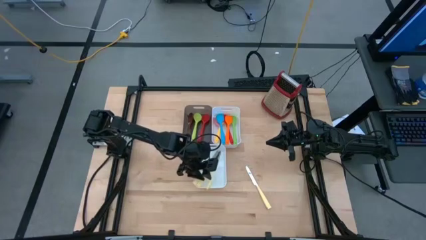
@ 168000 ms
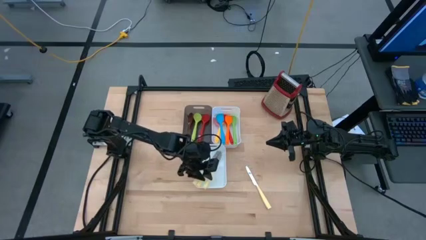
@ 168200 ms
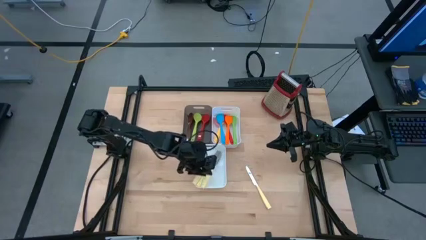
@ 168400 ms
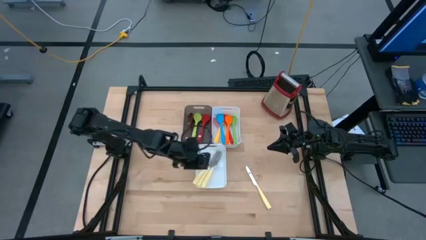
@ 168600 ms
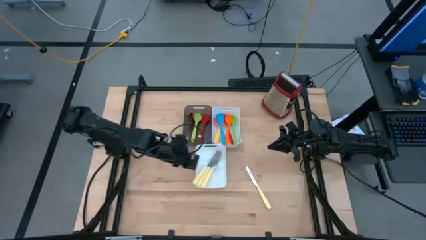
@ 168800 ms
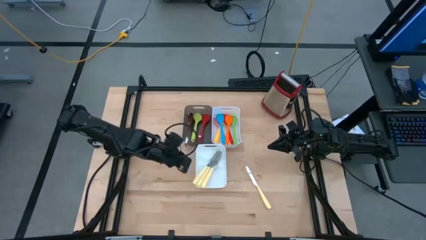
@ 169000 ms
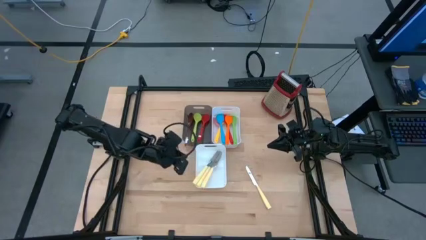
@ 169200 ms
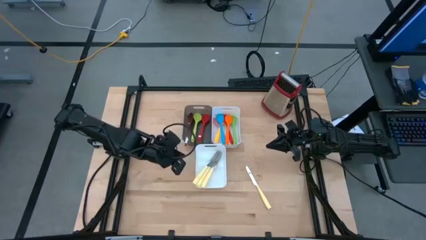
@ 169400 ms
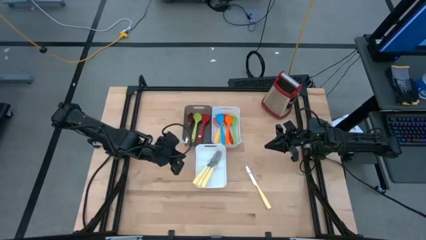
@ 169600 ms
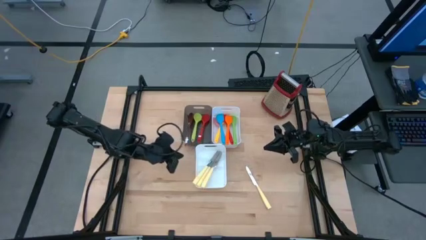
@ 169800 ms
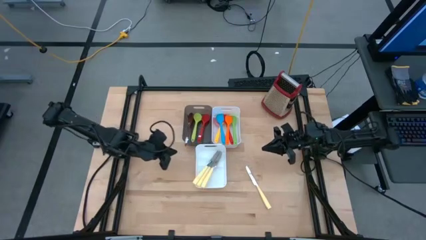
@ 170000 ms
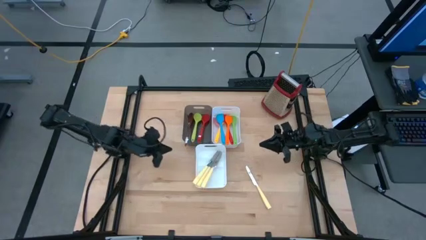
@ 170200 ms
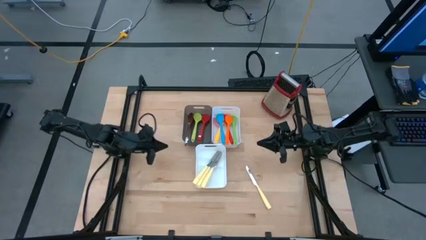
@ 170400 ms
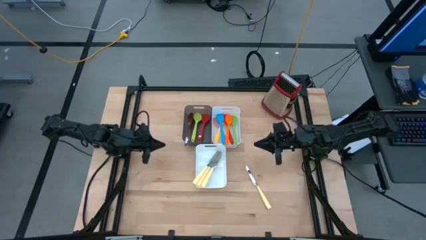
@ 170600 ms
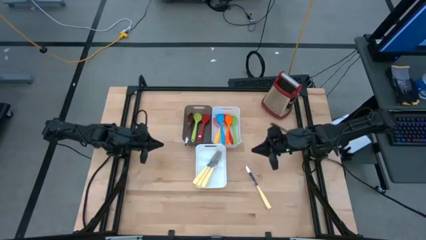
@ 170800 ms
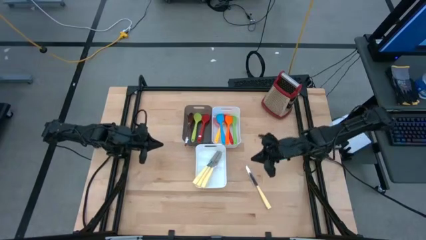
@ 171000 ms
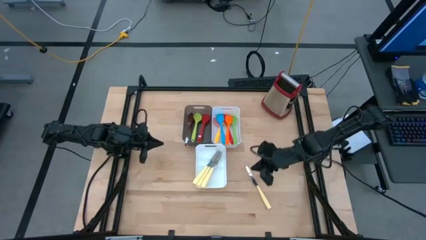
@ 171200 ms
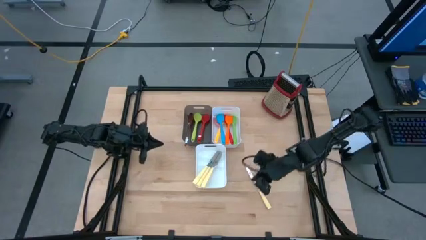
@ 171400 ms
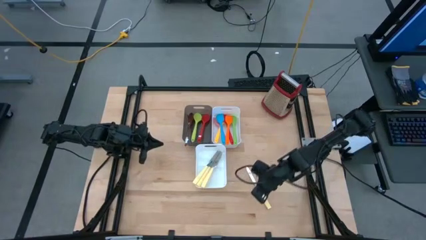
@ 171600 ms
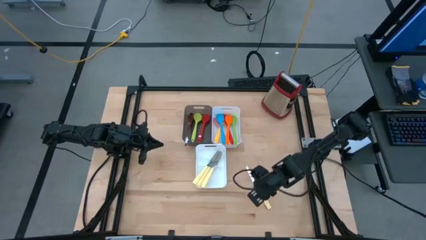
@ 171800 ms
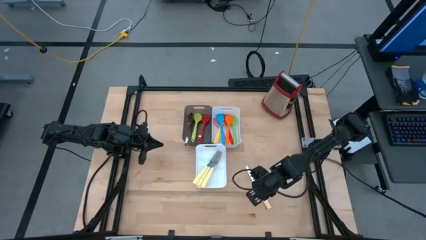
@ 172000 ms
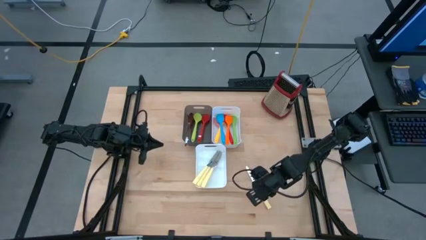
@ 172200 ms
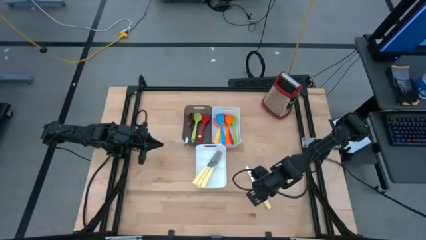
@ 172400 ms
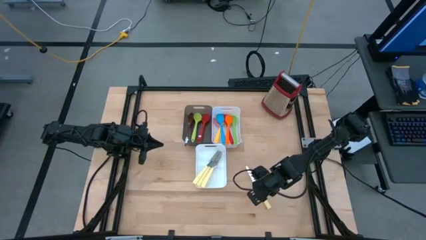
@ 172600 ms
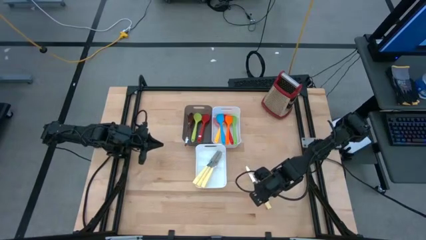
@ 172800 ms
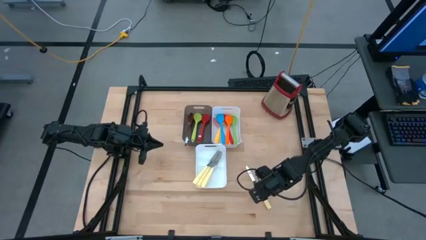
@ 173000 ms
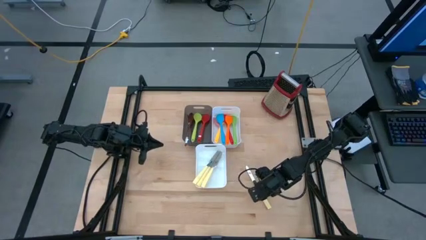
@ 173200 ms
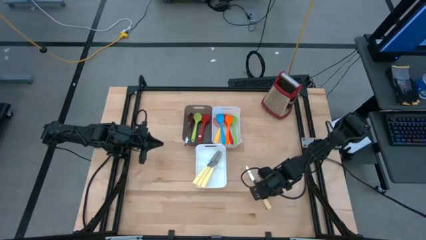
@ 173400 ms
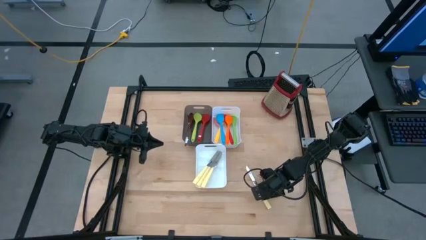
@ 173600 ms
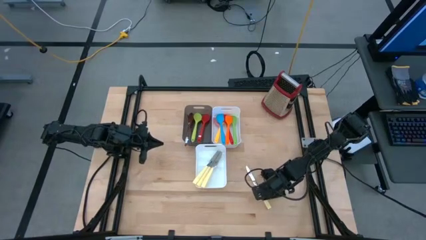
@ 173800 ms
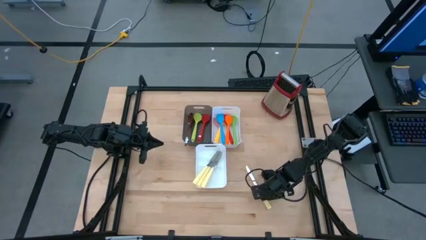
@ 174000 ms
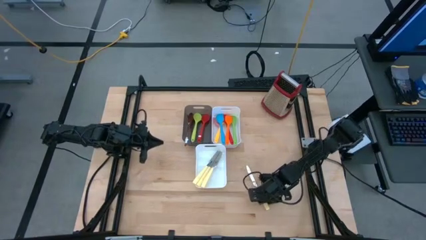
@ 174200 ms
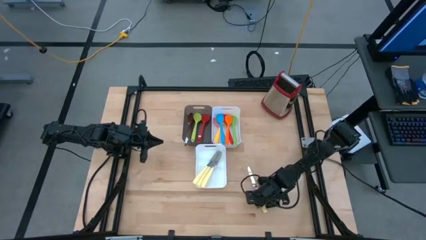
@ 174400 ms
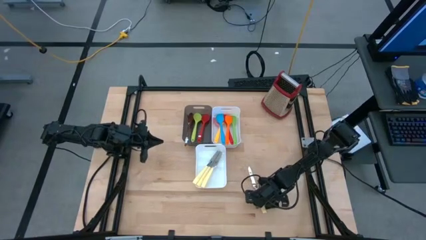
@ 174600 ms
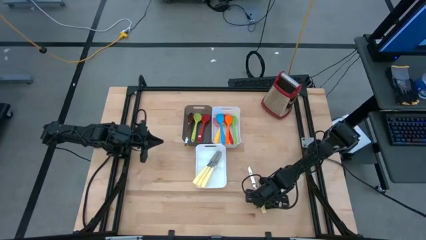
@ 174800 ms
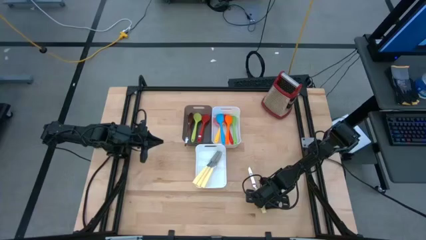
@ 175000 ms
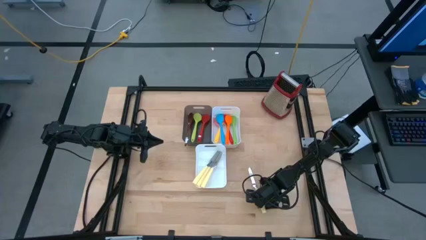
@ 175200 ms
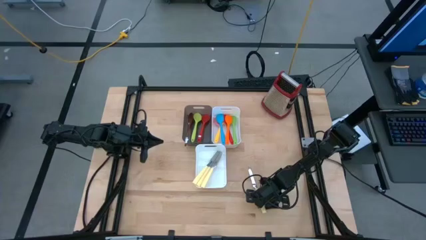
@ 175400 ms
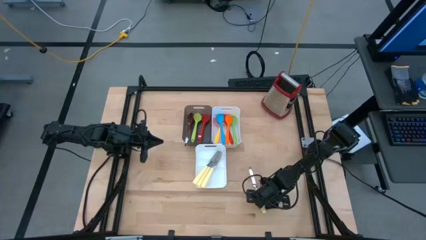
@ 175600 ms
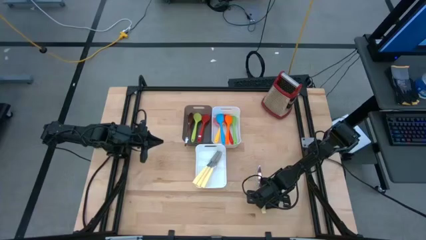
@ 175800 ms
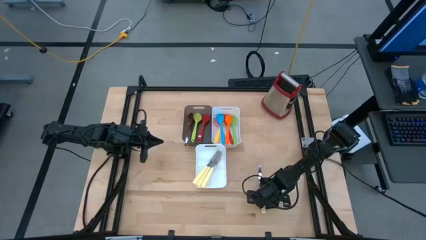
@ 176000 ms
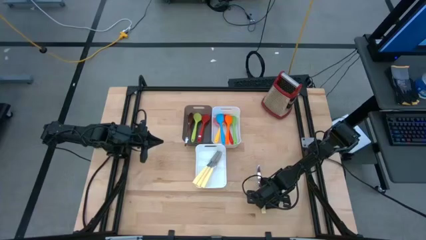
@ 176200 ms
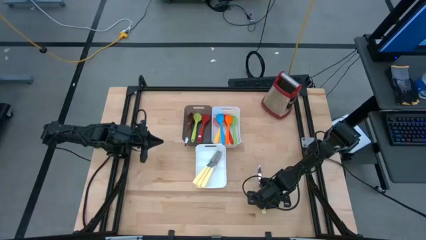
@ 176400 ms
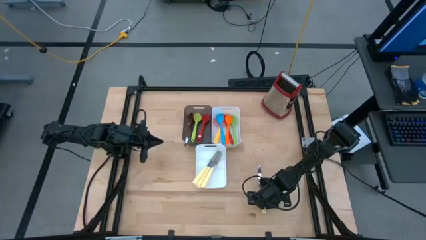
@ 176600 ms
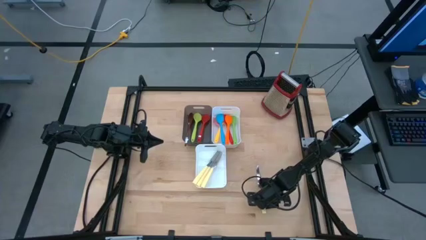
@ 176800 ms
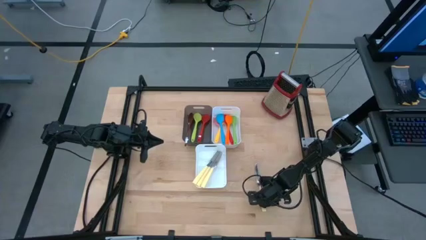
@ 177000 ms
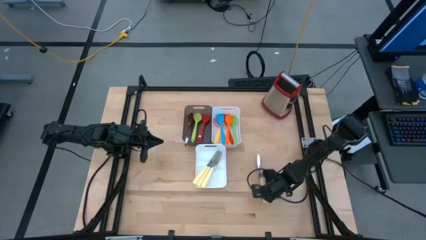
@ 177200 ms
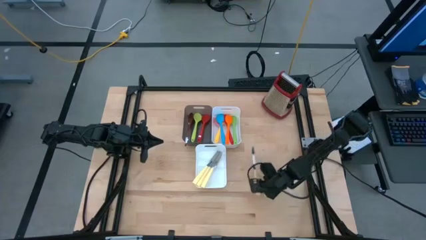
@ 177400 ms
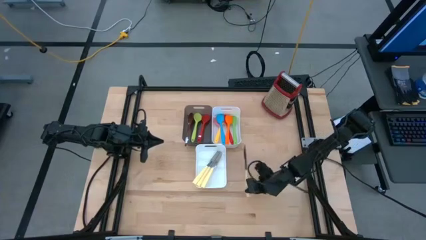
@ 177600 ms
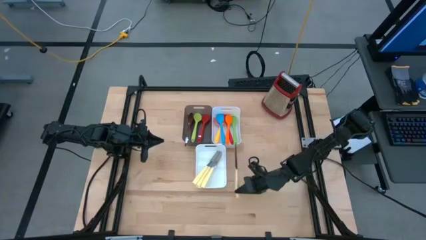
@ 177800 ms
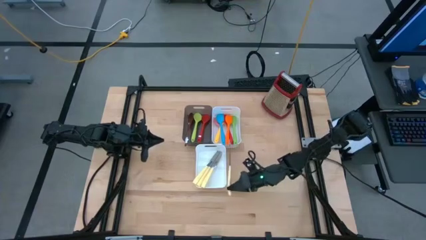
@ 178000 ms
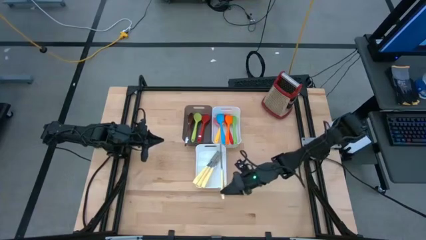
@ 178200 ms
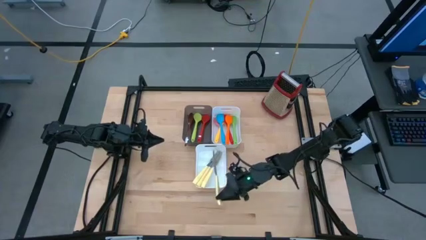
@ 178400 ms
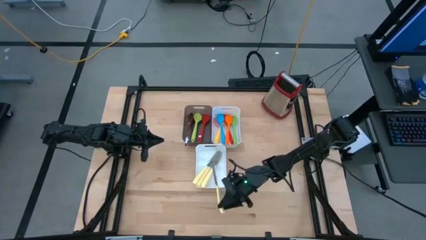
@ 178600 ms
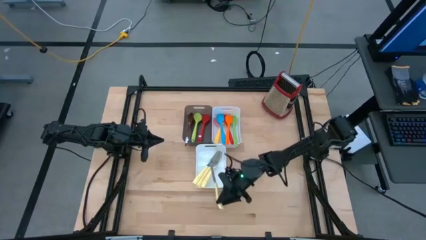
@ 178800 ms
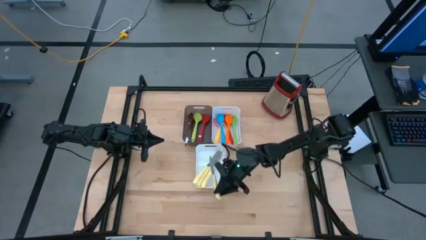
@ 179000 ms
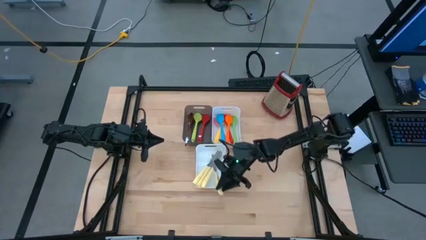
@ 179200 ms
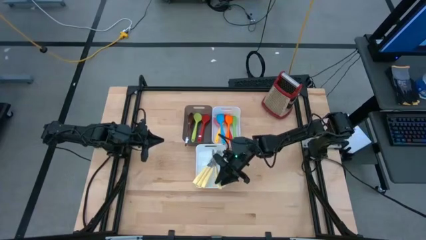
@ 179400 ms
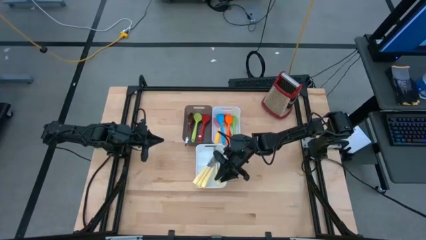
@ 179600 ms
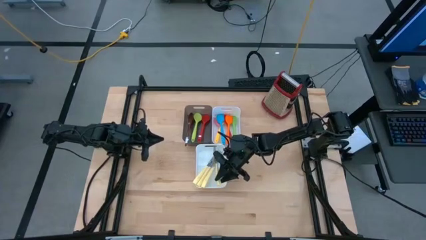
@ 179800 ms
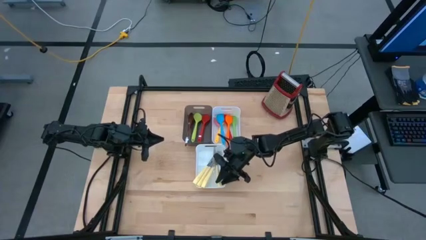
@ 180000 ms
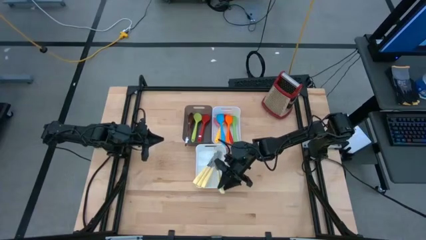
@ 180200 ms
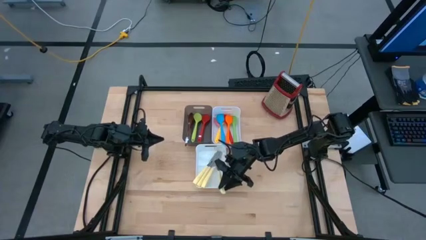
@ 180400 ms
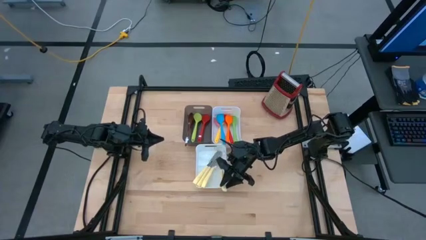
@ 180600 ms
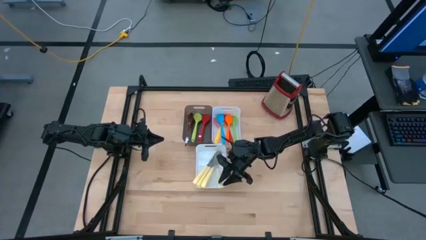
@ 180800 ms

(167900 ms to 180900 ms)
Task: Pick & Place Kitchen Items
Put the yellow knife into the bottom white bin
